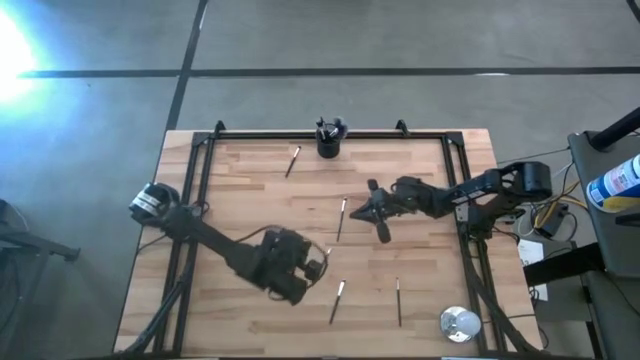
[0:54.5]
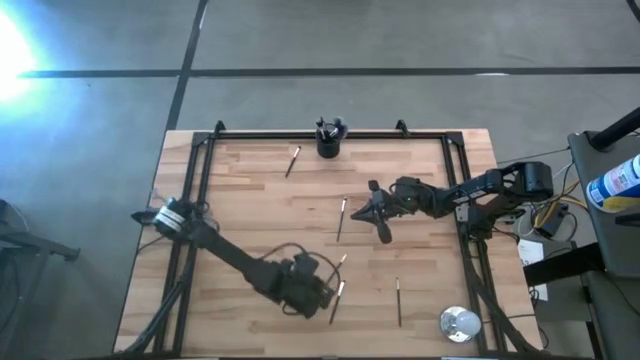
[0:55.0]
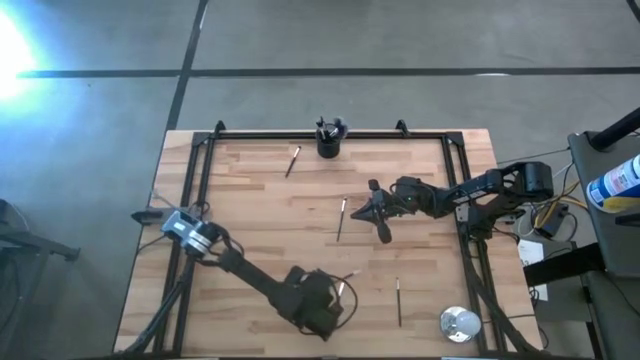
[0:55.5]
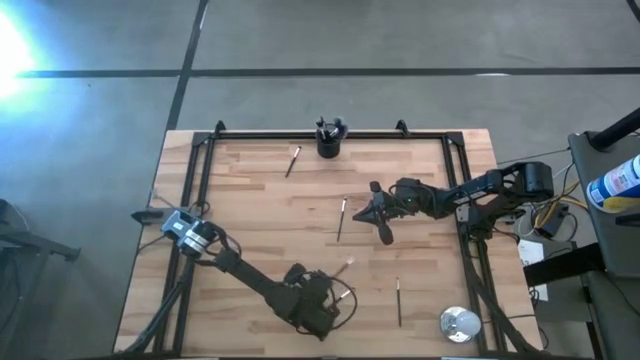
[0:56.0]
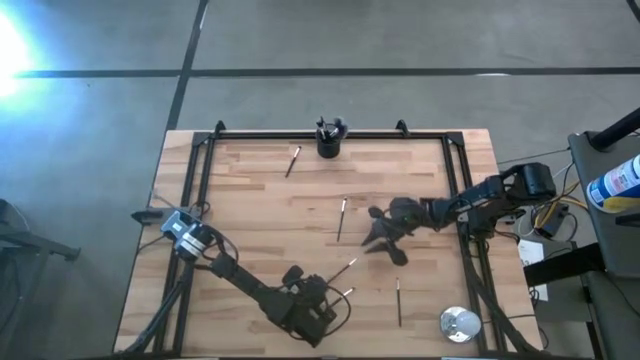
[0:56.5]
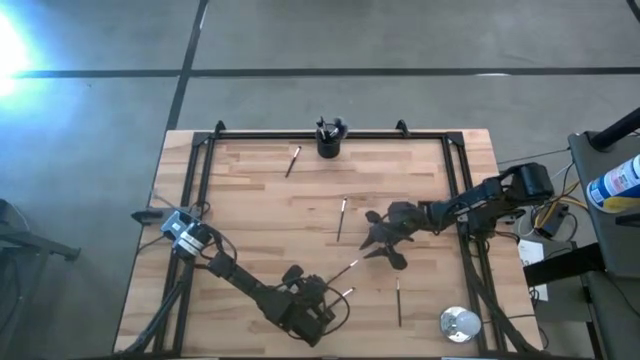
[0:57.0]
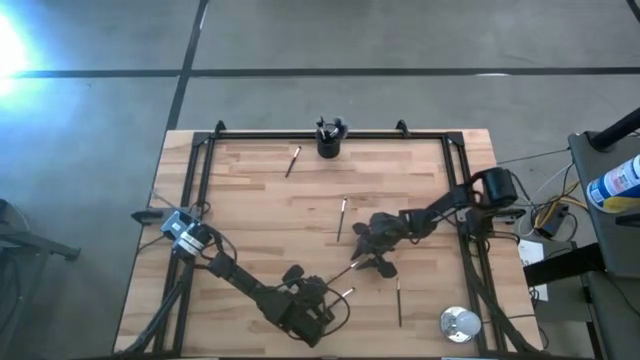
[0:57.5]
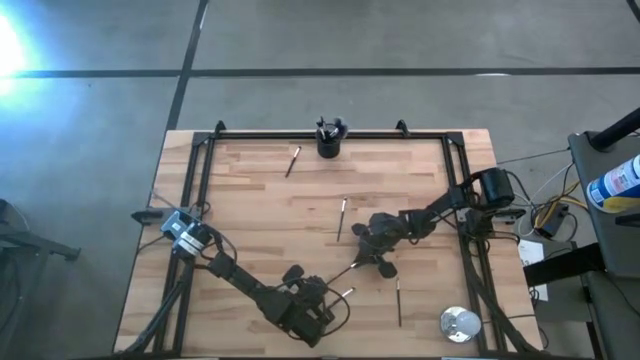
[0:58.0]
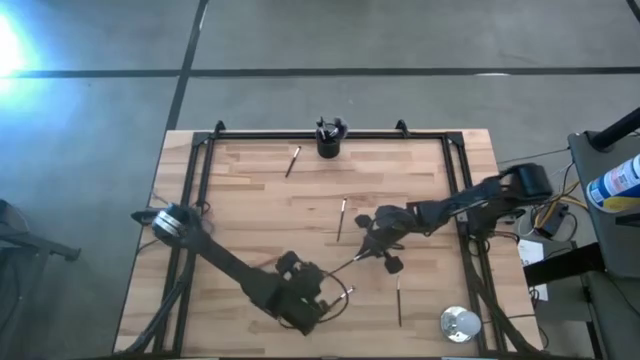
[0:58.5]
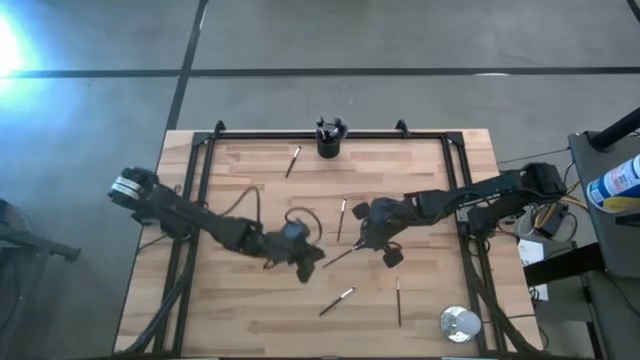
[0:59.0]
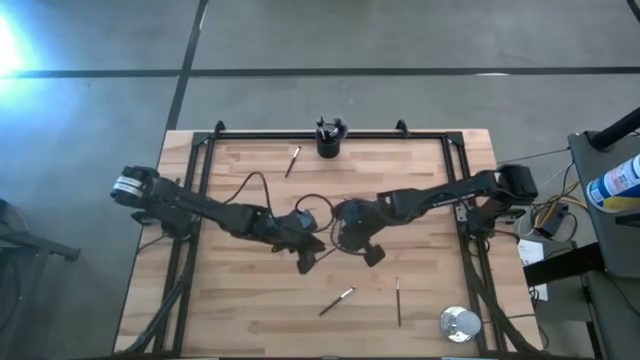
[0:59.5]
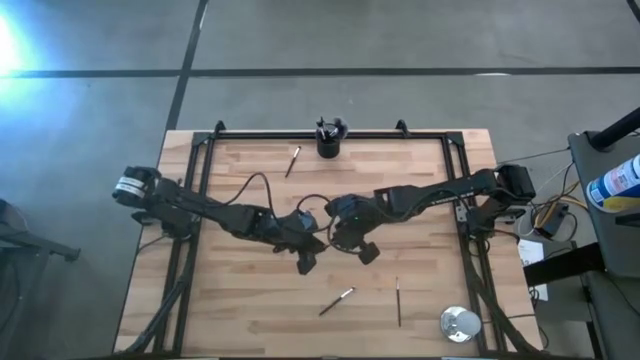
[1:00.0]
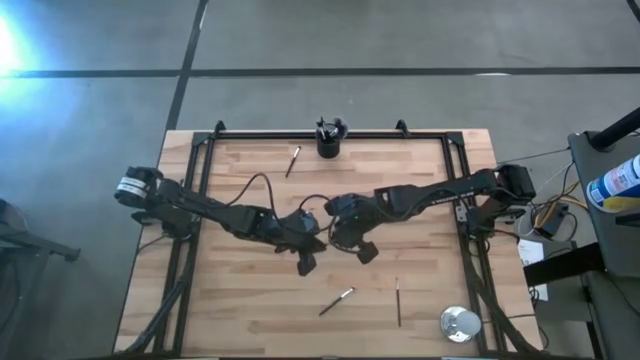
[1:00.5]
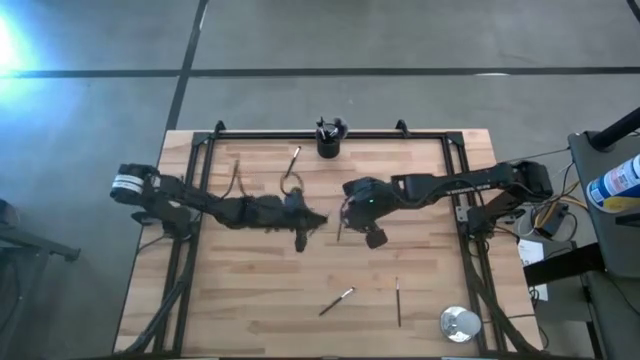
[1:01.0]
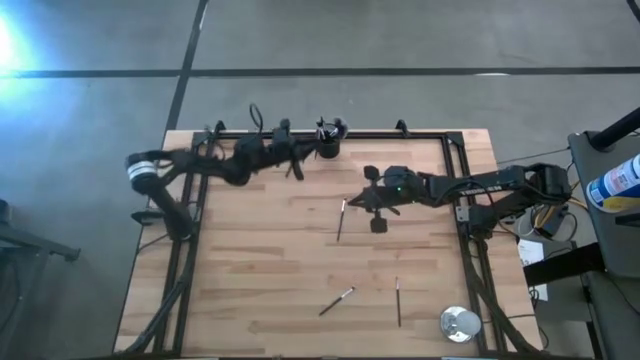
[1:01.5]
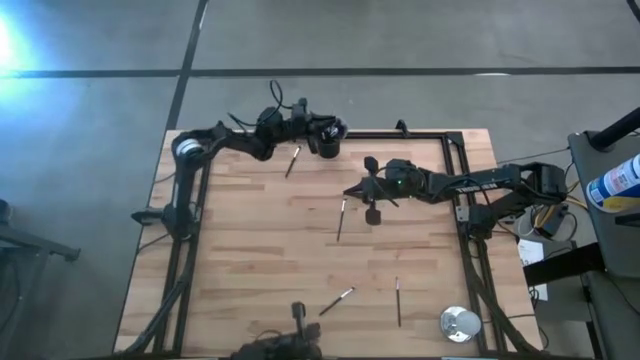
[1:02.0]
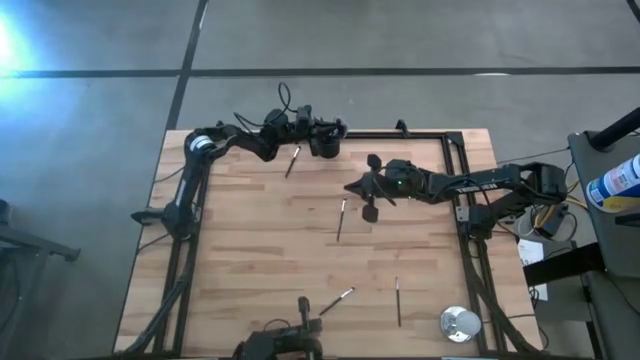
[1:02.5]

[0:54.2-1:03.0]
Task: Put items in baskets/containers
Put the black liner brush into the black pen holder

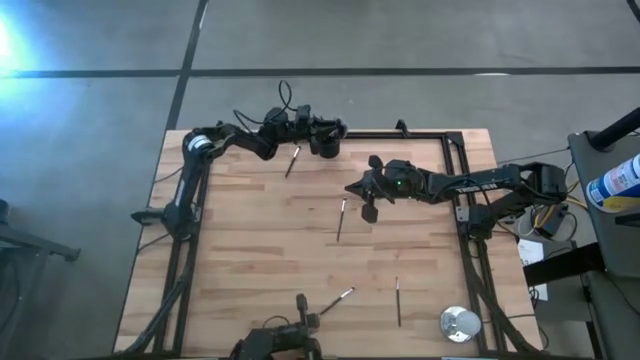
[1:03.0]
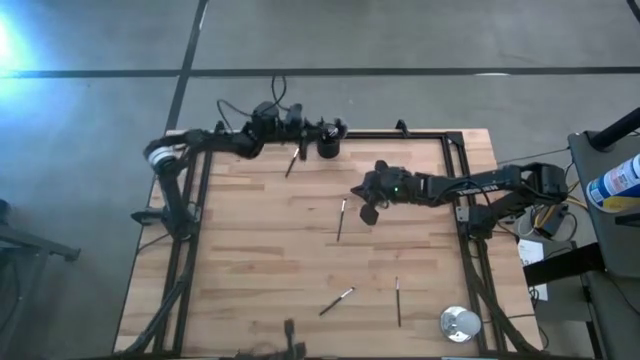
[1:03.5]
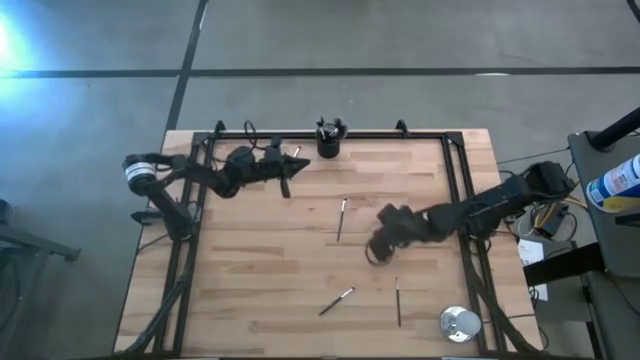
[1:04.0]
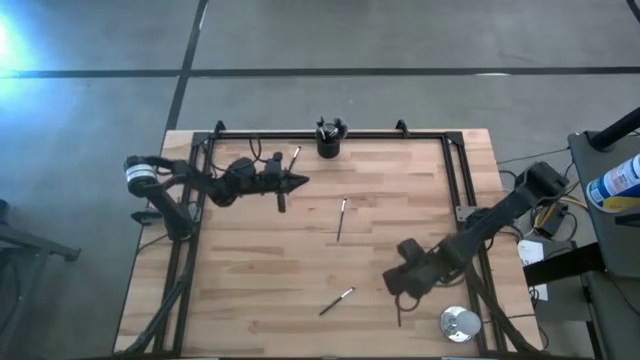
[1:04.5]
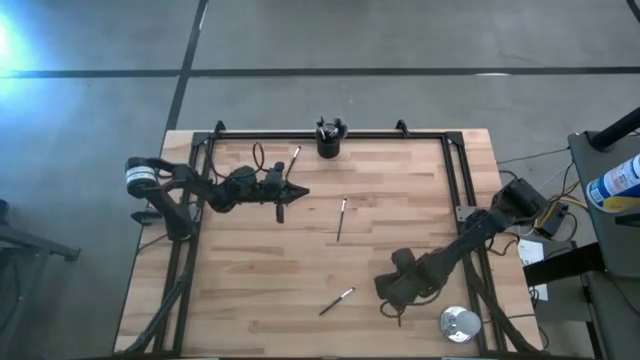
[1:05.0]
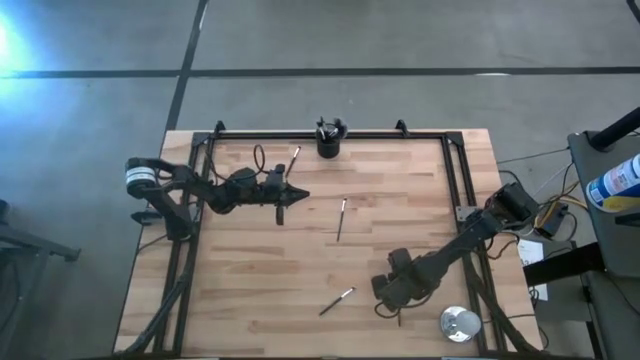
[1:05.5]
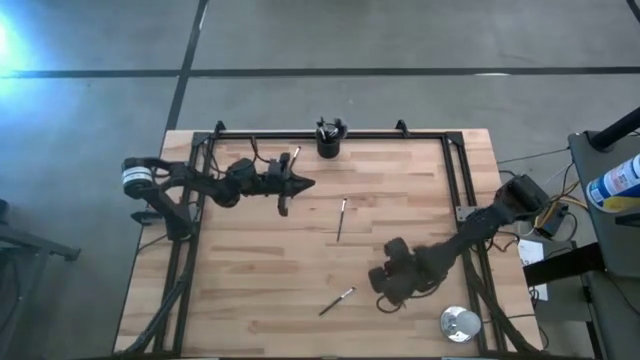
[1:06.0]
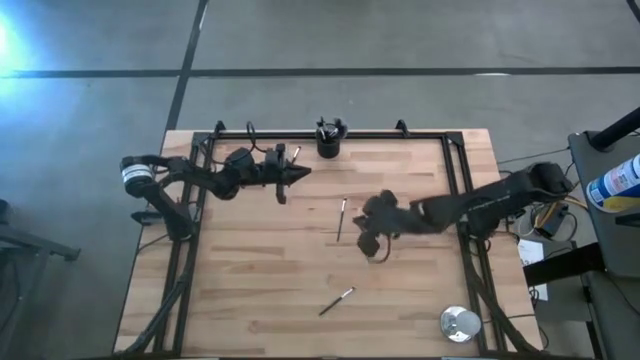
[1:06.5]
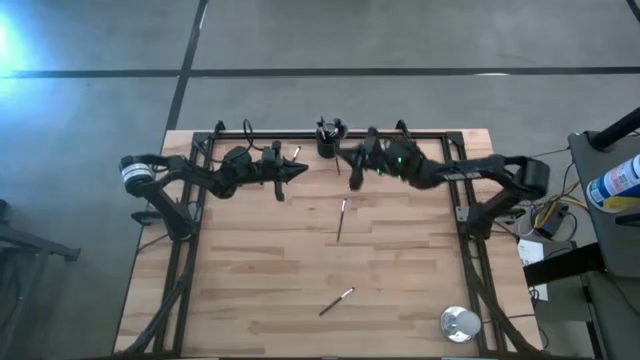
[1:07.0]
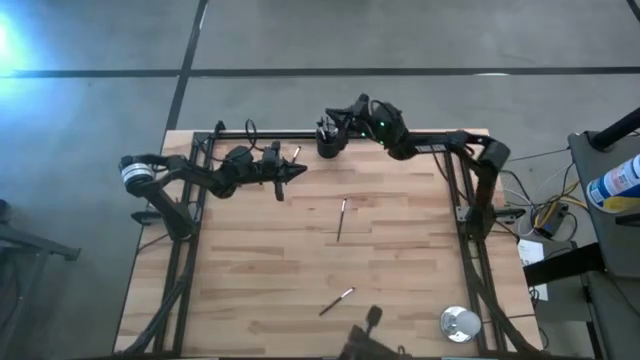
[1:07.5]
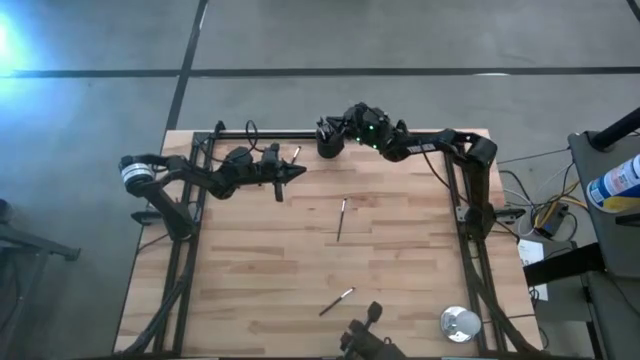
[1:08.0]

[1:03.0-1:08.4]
Put the black eyeshadow brush into the black pen holder

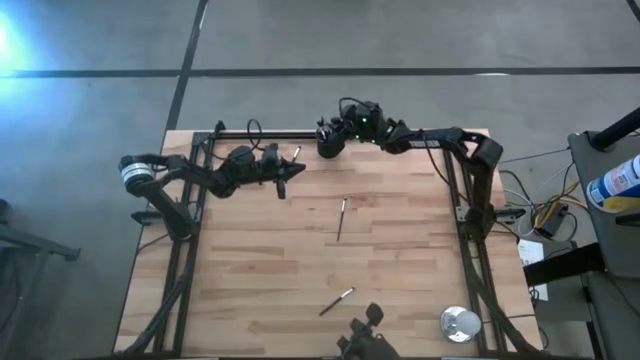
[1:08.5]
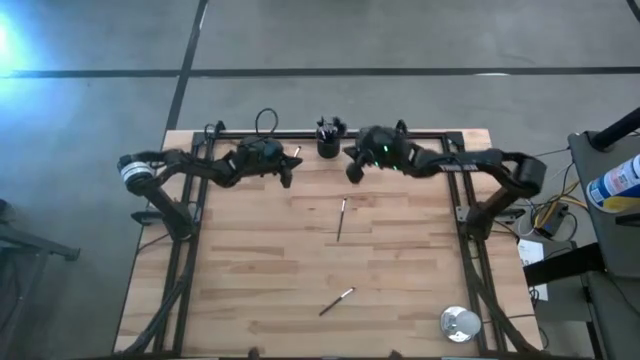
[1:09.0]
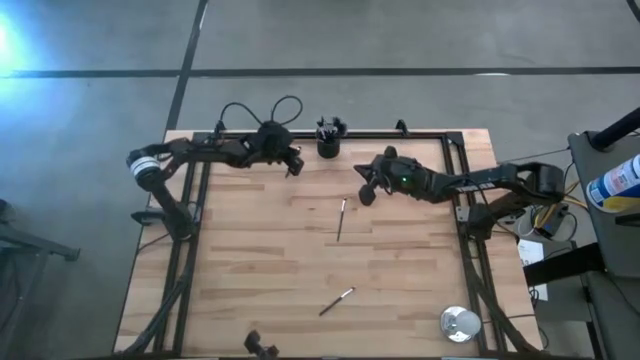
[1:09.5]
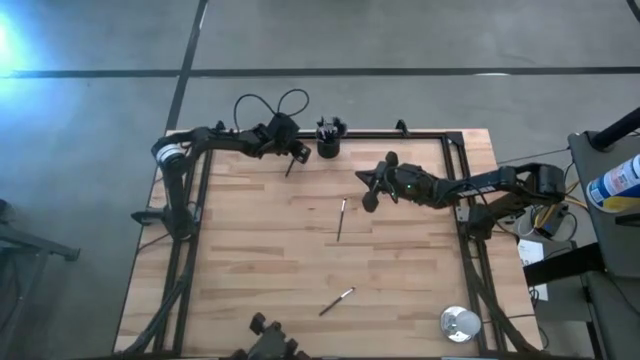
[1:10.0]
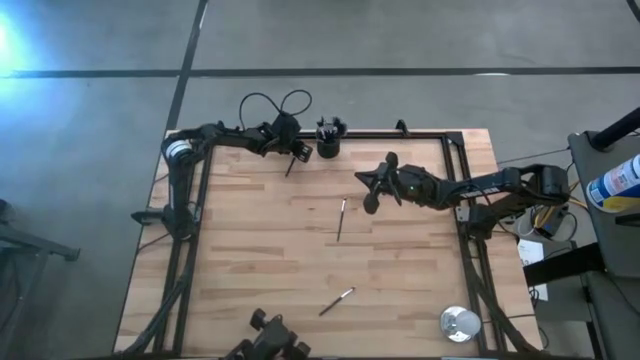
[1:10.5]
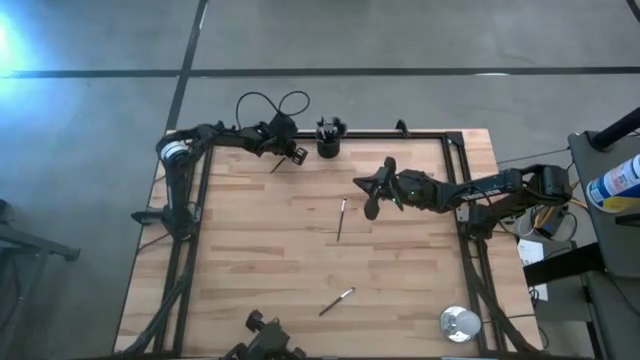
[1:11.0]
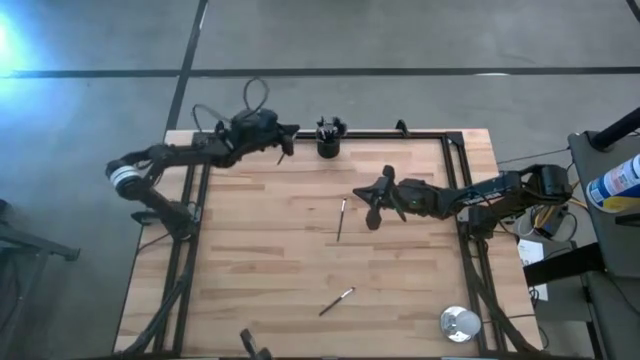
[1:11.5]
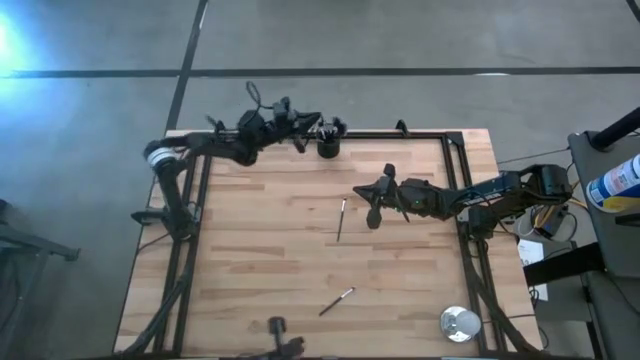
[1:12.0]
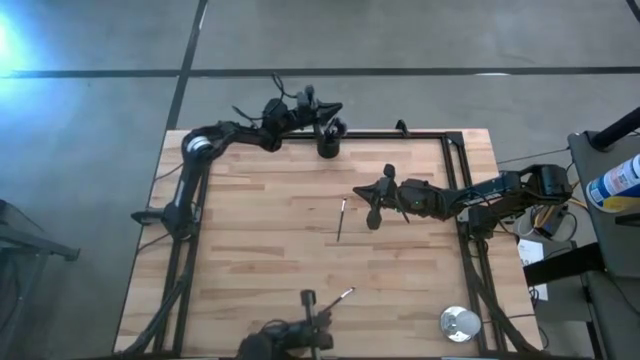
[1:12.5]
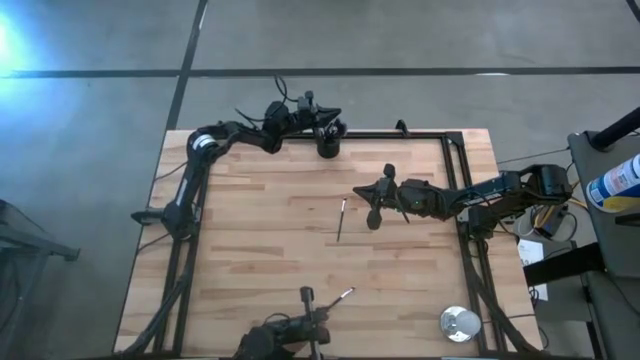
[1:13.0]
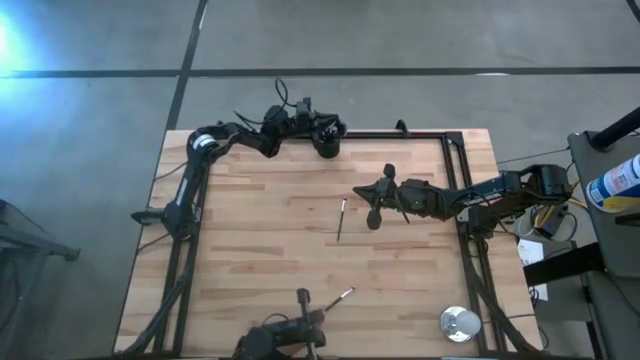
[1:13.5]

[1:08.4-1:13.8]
Put the black eyeshadow brush into the black pen holder

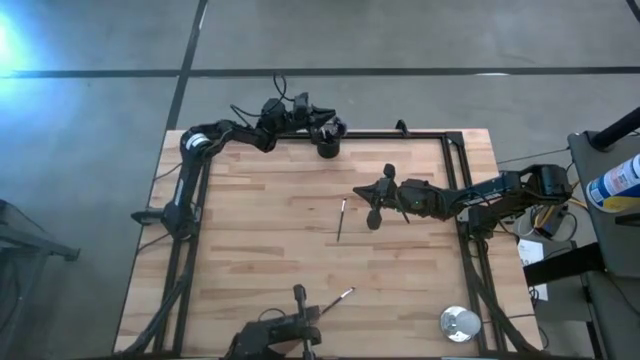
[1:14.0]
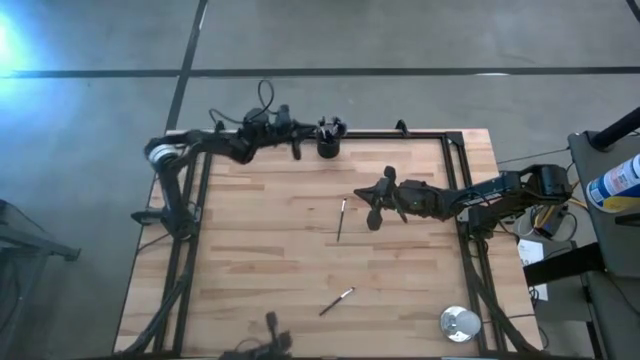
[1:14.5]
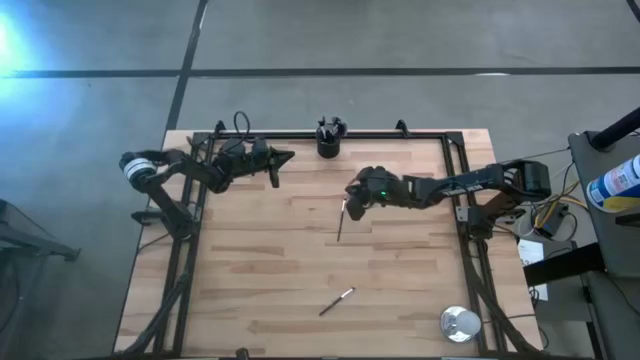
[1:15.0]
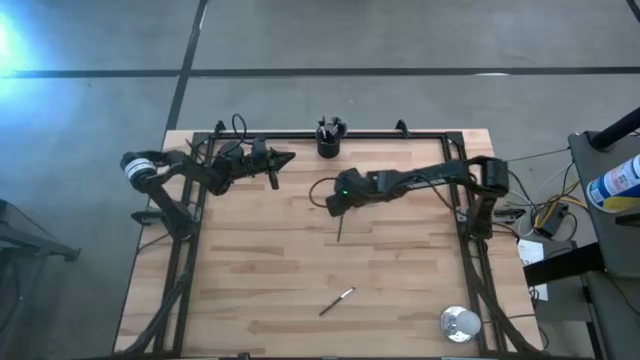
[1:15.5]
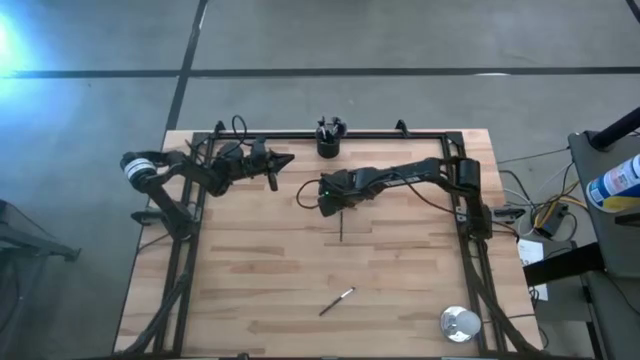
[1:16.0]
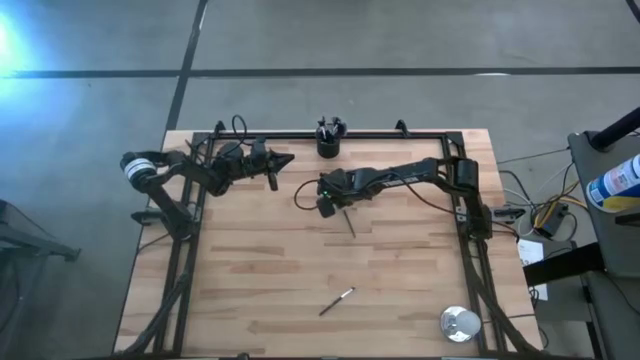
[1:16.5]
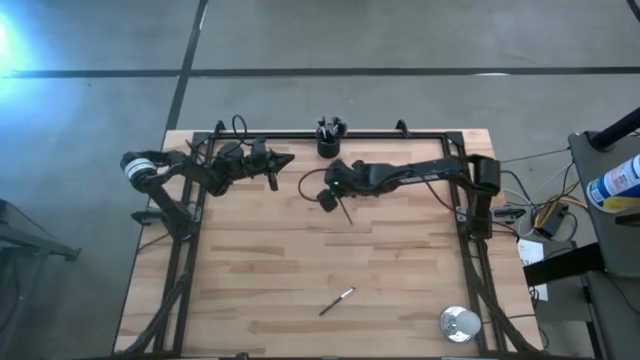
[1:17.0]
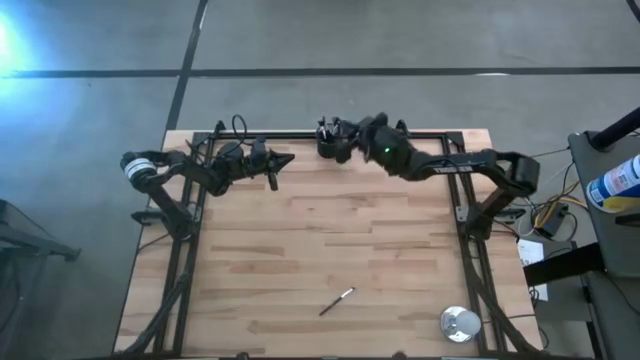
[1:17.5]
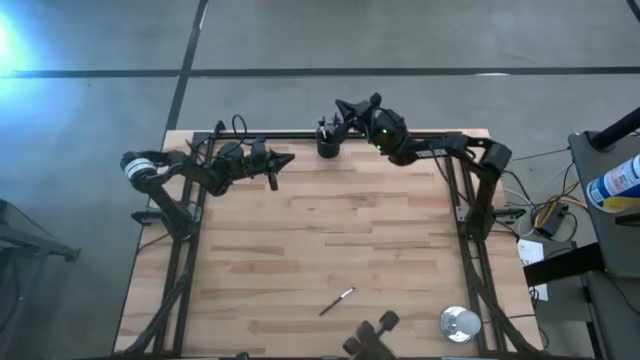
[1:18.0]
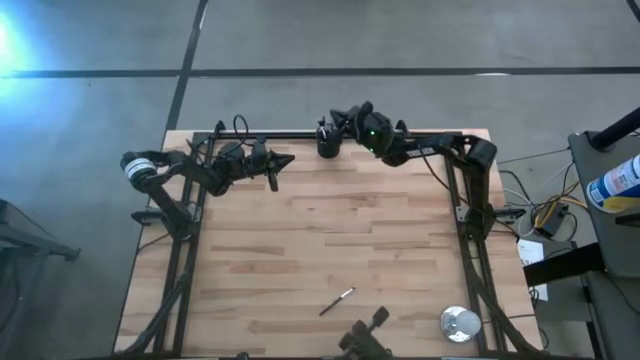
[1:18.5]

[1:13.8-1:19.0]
Put the black eyeshadow brush into the black pen holder
